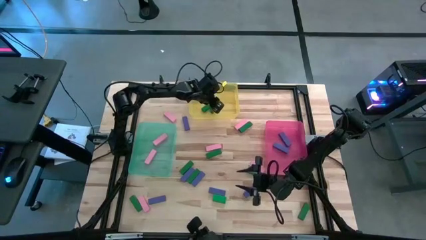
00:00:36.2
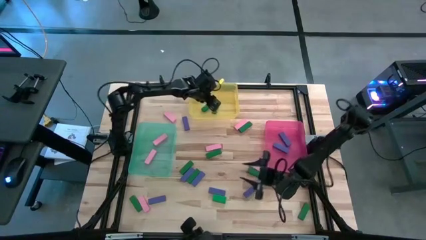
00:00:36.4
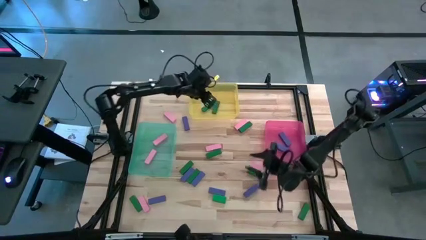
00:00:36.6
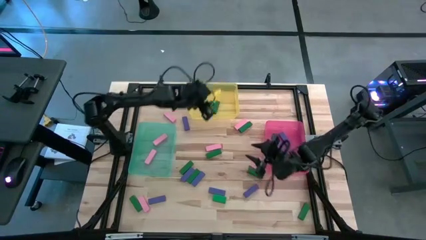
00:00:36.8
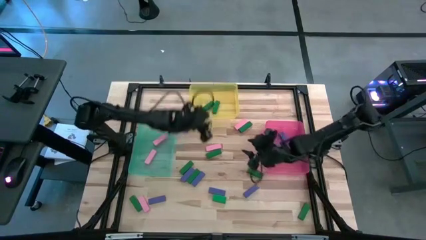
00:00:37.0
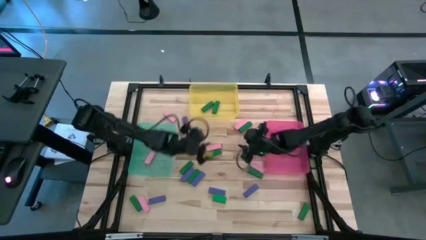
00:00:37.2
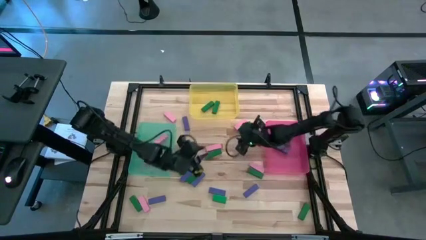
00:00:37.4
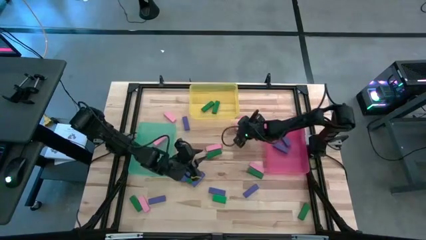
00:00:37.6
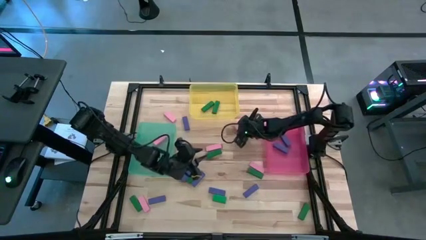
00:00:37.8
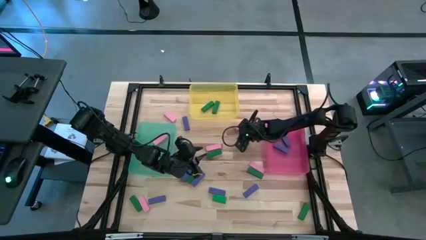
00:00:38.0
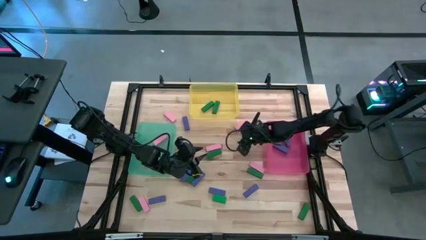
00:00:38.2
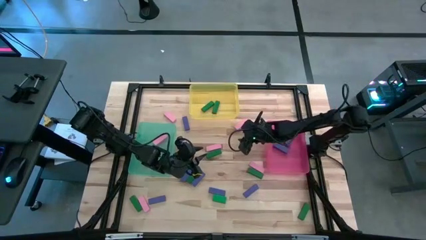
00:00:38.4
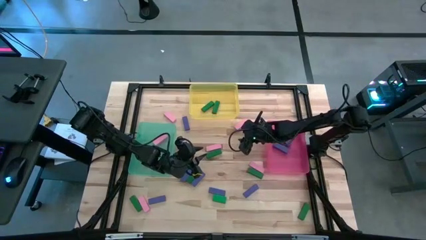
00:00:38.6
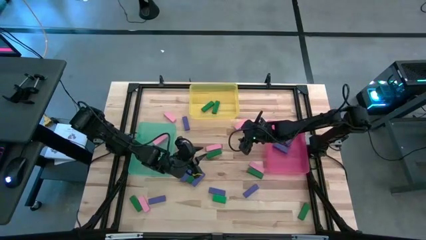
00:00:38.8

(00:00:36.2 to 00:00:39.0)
Task: Sort blocks
Adjust the green block

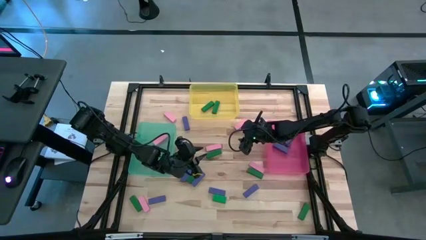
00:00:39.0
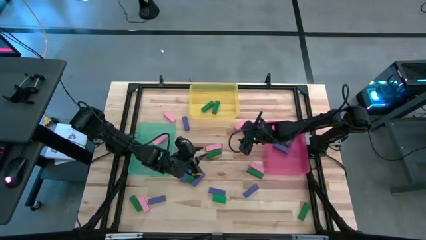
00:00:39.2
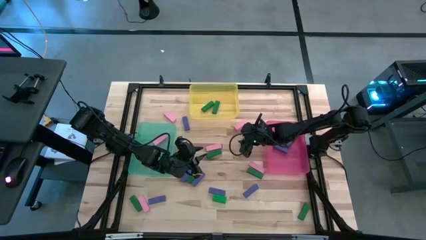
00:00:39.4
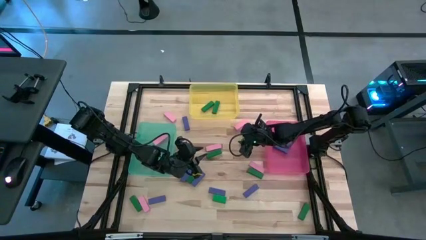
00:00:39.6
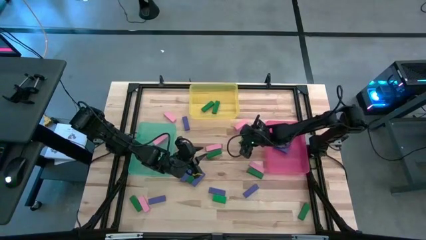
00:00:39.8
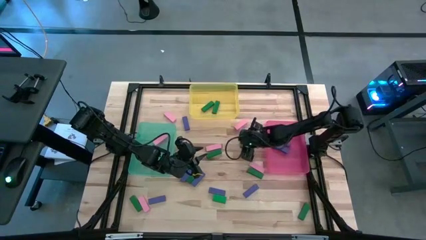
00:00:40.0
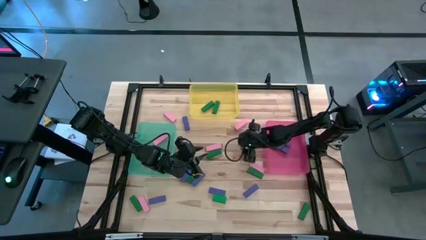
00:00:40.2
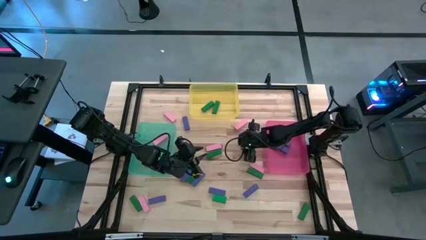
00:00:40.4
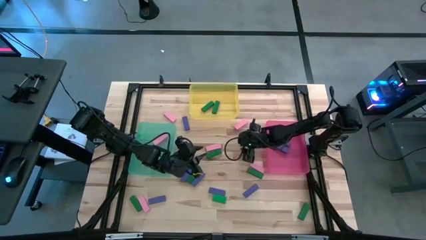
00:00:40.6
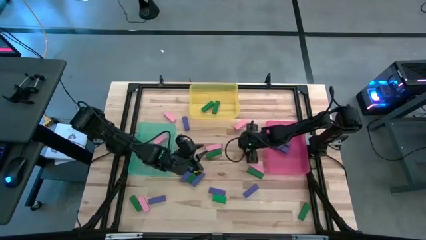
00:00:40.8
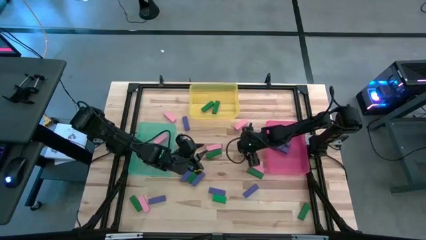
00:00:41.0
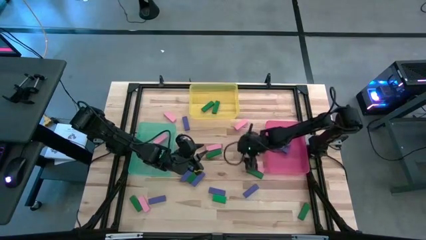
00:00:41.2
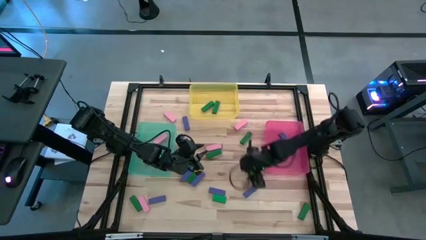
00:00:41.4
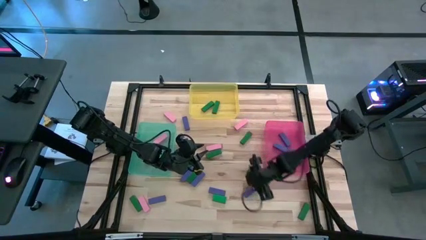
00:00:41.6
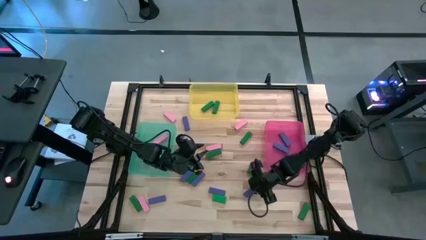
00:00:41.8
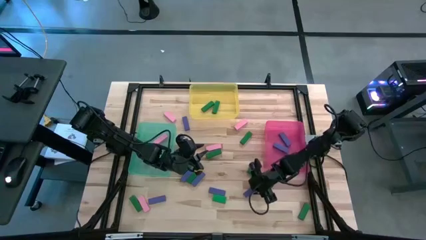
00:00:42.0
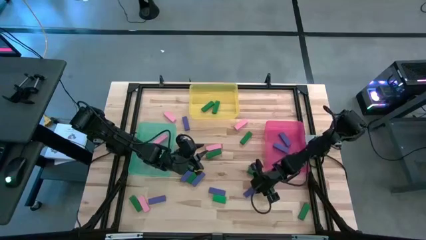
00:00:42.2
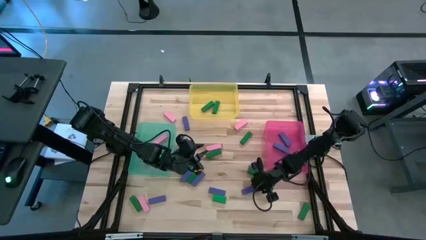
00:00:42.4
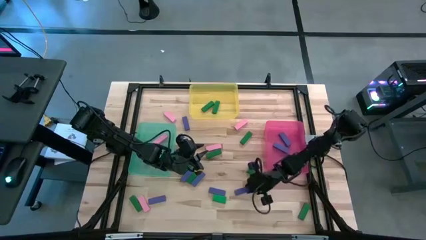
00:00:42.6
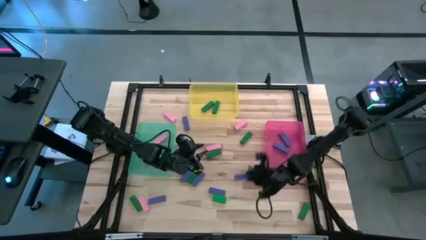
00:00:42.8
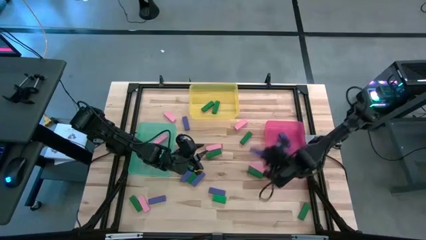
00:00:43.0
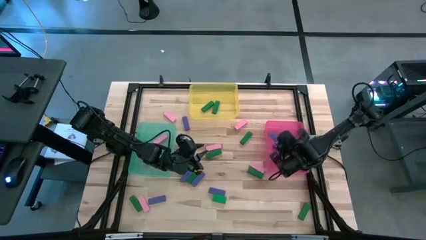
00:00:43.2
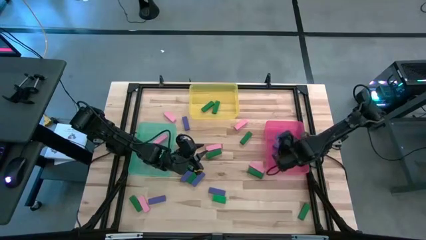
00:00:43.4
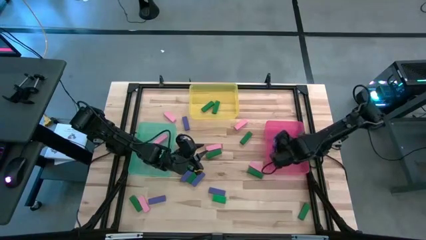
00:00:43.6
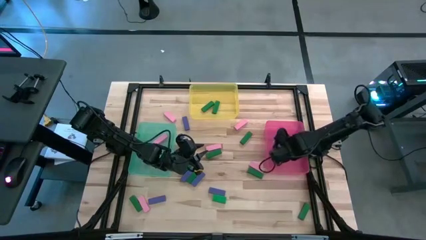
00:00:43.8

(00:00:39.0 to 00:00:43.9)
Put the blue block into the pink bin

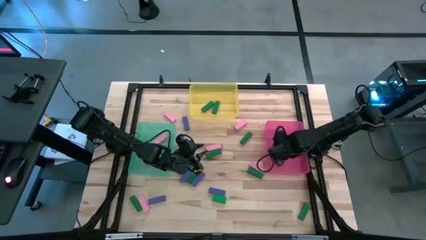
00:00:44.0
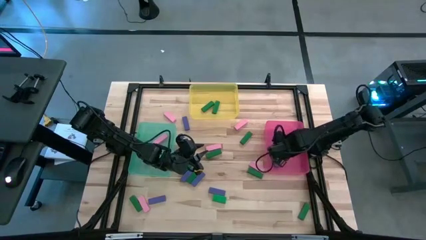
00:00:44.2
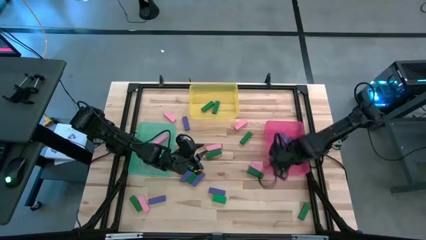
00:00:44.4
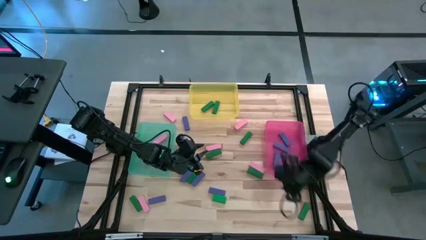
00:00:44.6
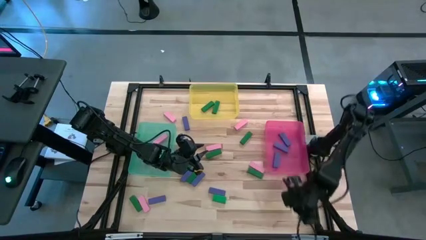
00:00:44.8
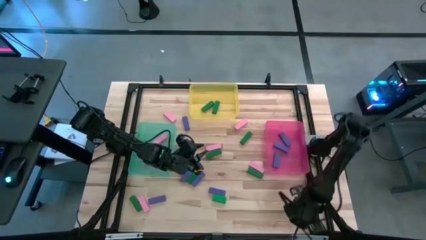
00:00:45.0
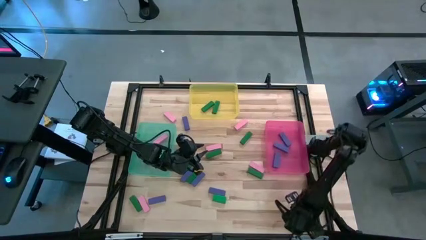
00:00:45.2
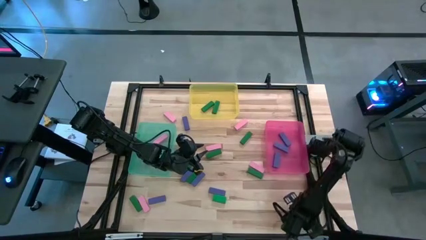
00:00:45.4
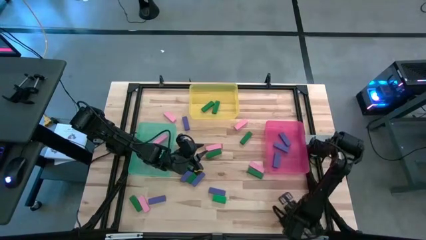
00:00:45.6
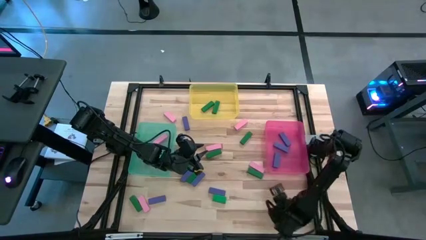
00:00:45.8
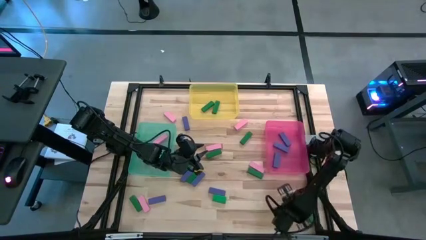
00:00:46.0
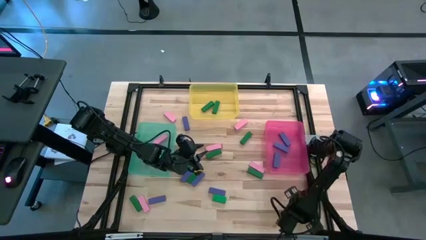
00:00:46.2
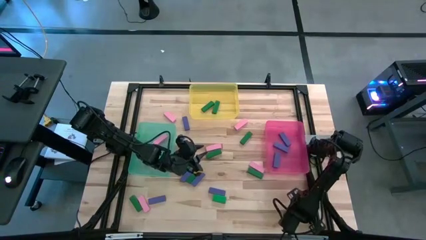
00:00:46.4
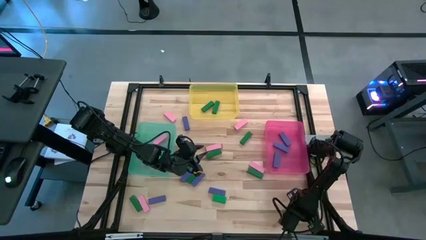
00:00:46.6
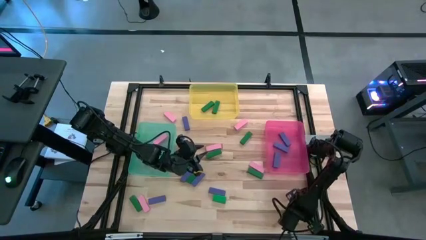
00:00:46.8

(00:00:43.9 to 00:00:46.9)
Put the green block into the yellow bin

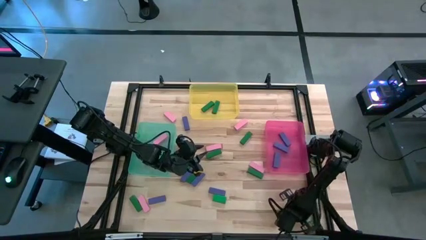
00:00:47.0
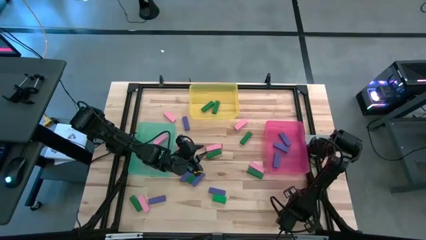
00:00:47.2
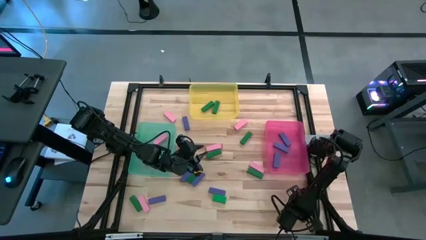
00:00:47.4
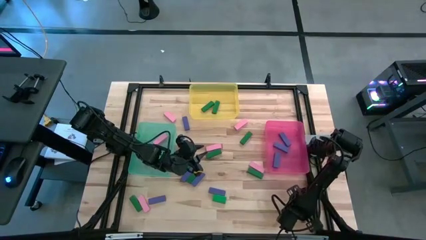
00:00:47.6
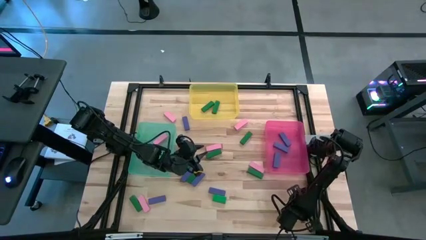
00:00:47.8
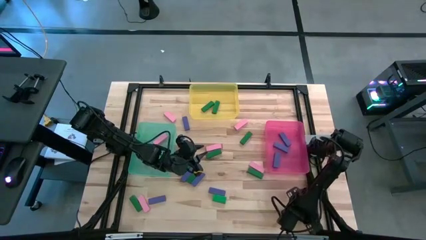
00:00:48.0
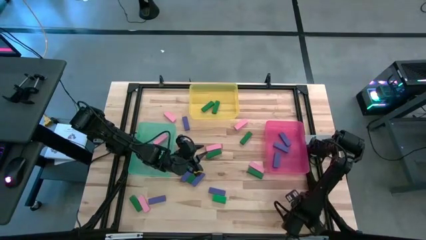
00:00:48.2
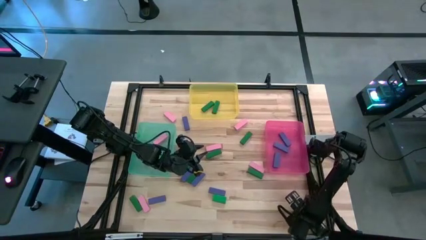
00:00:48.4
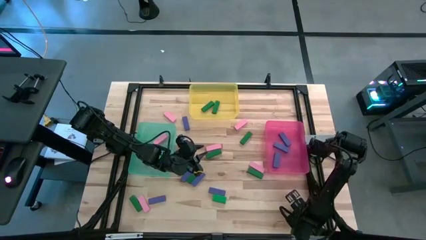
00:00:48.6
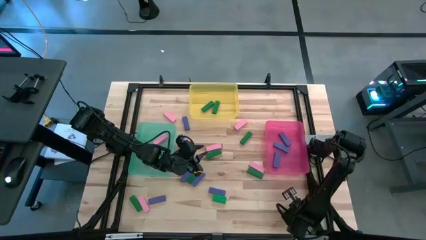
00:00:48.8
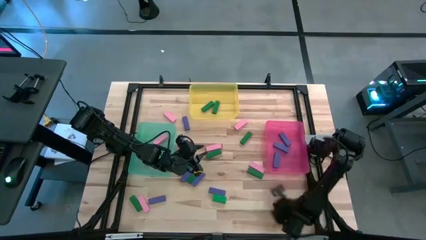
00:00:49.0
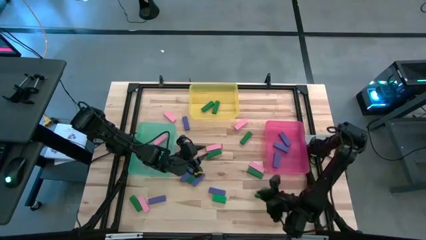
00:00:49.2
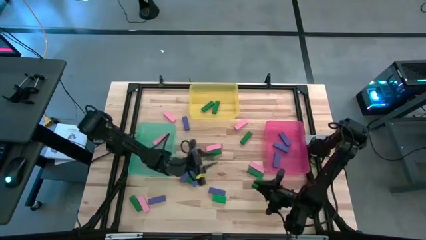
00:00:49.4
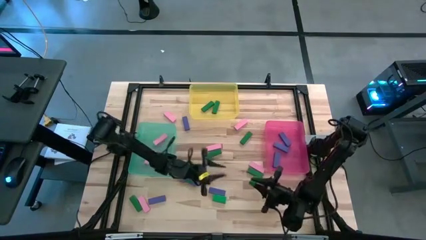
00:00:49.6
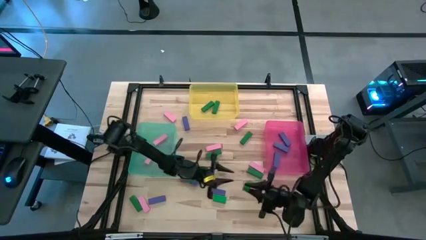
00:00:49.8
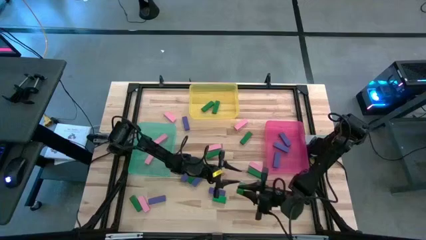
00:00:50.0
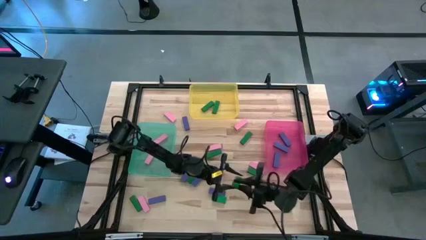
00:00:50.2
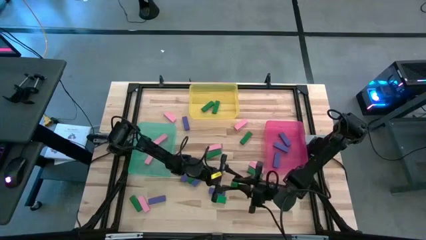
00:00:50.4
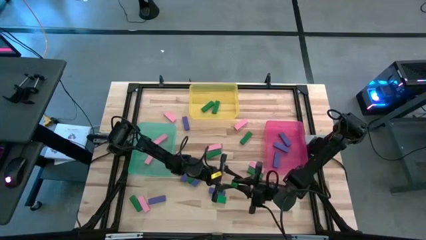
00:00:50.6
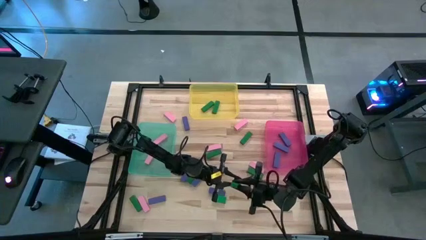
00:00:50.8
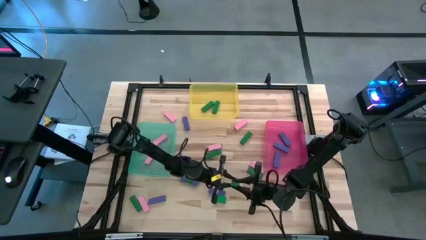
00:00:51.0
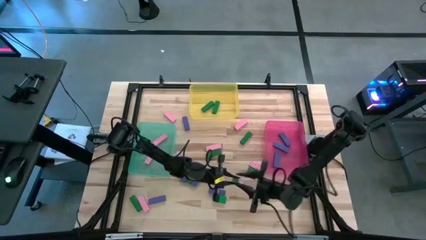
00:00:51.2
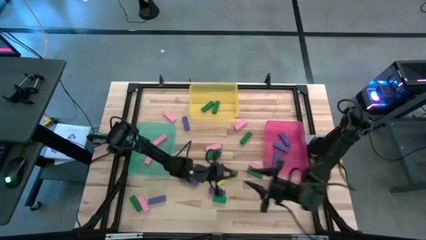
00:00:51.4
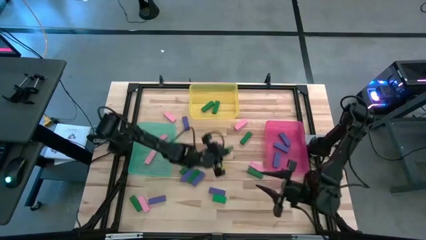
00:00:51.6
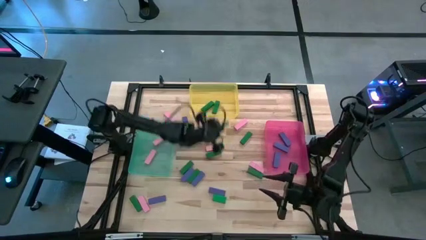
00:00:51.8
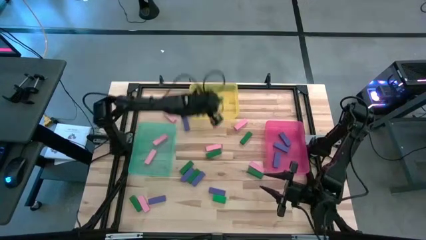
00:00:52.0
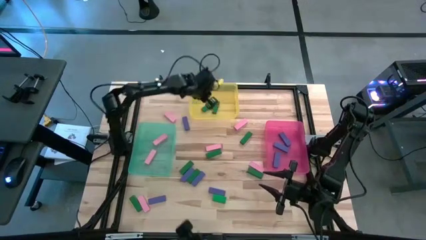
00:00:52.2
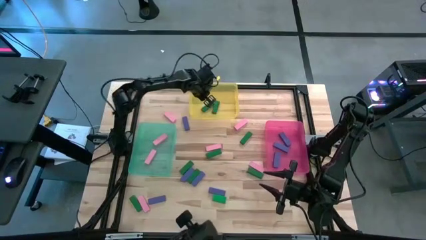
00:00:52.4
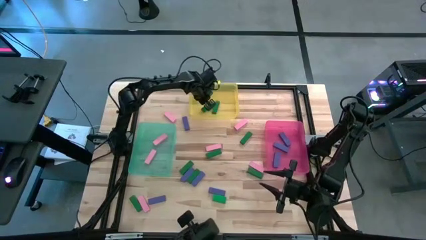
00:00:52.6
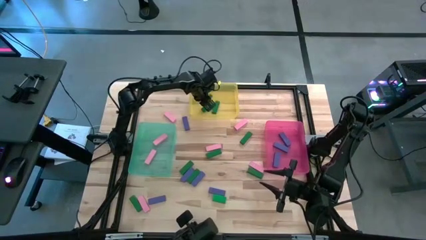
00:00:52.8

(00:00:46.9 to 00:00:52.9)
Put the green block into the yellow bin
